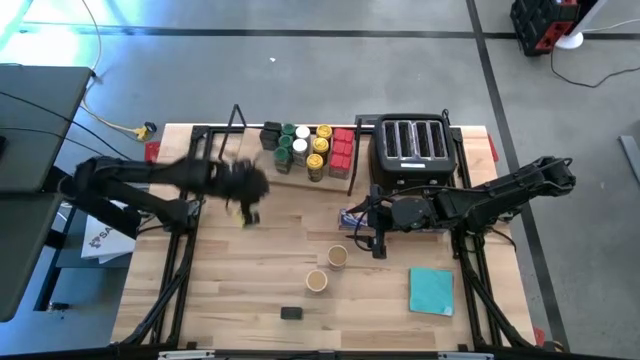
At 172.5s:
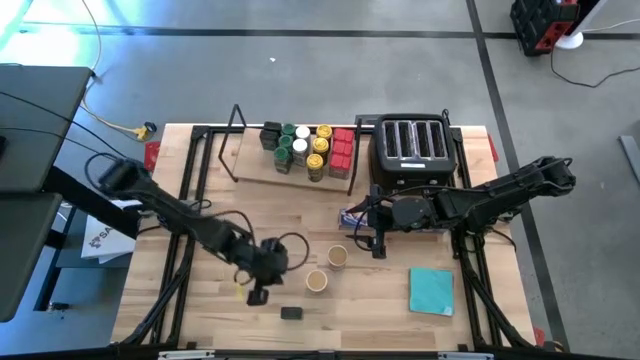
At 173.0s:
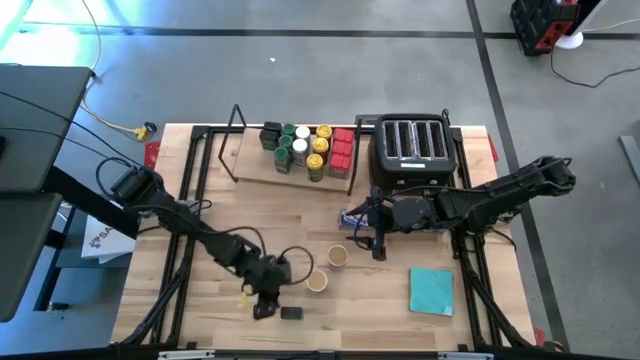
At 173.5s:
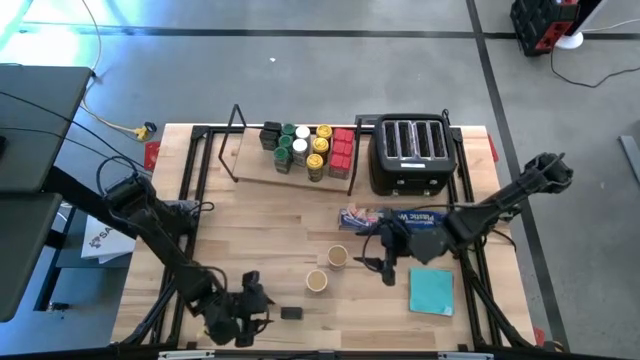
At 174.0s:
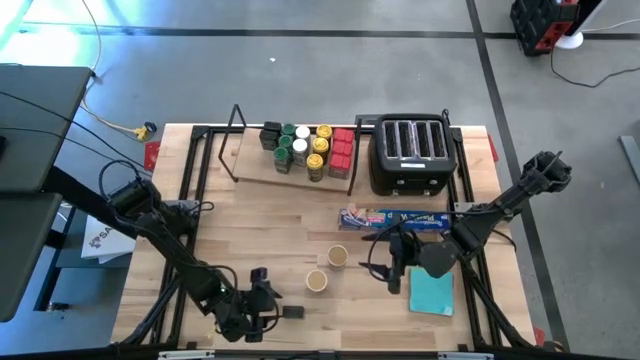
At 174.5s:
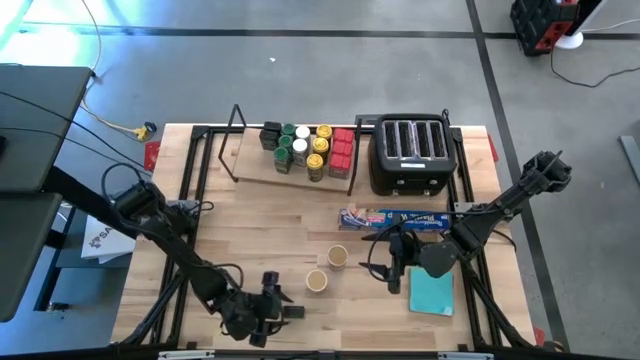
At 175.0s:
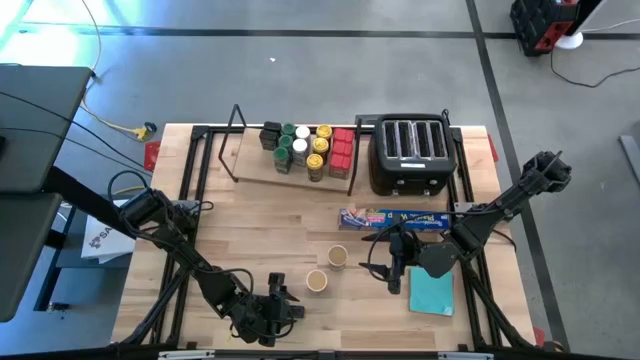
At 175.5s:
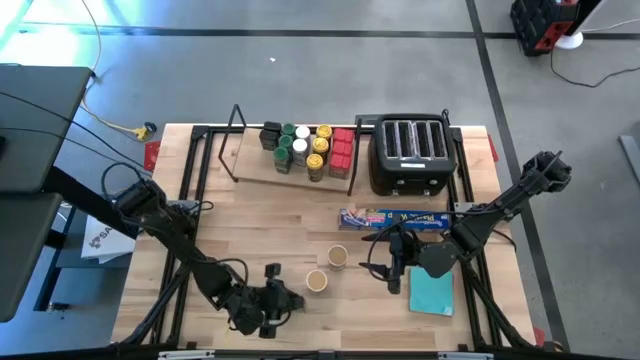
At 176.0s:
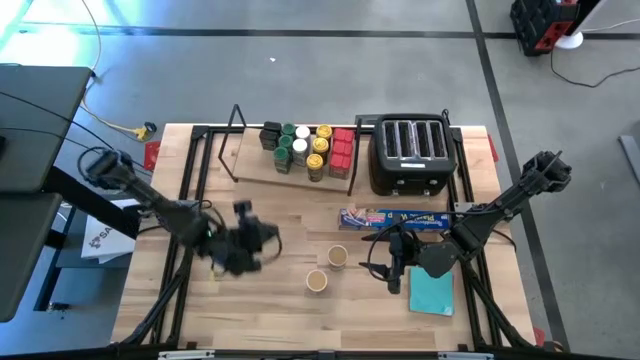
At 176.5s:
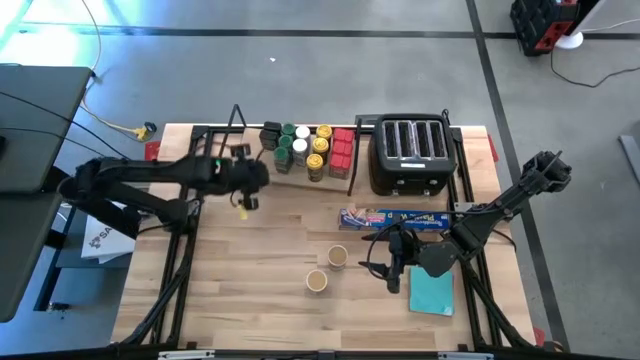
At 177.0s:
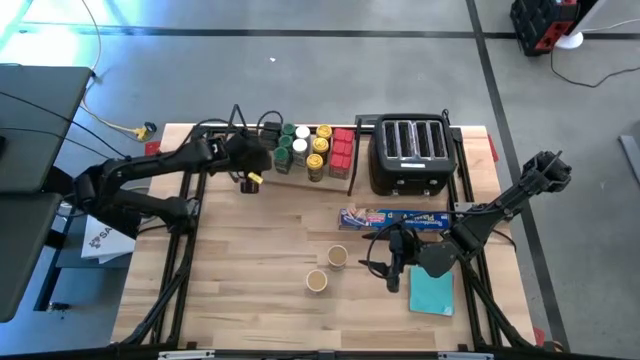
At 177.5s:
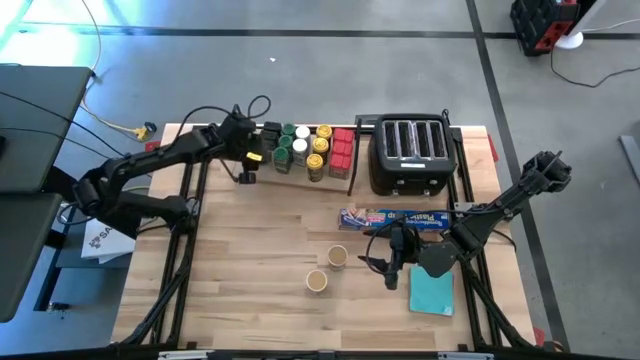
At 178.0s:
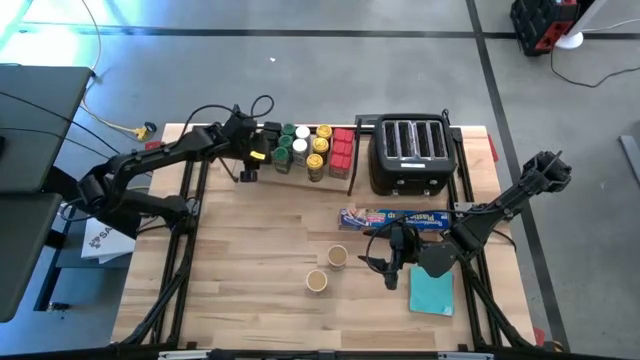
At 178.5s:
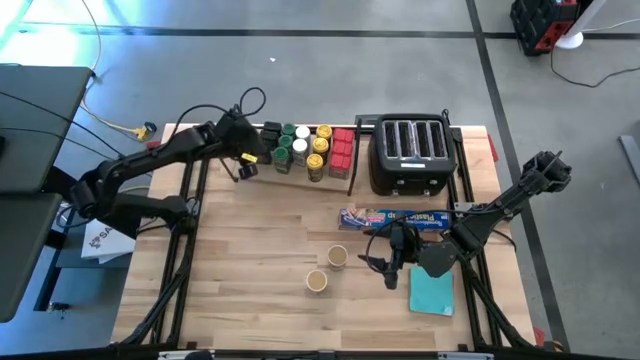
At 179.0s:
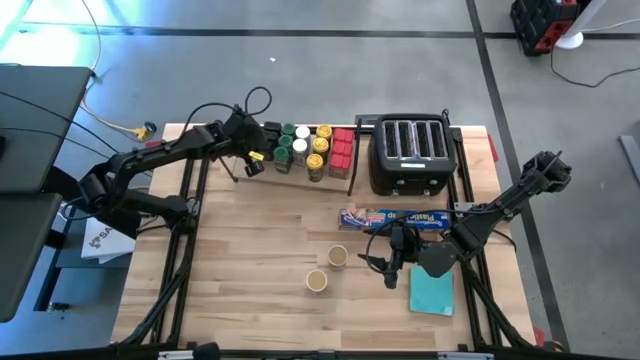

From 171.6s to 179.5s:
Task: Shelf spices
Put the black seasoning can on the shelf aligned with the other black seasoning cans

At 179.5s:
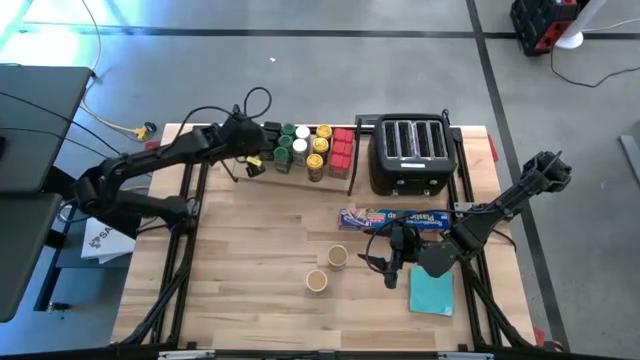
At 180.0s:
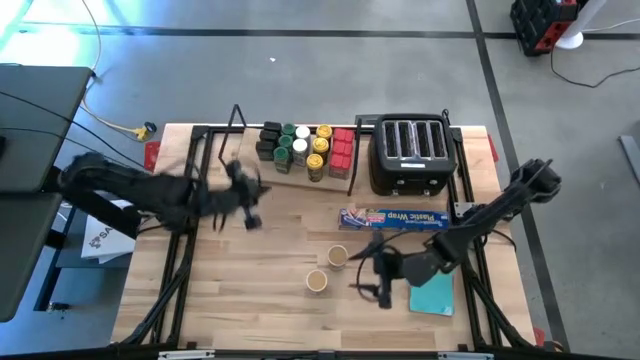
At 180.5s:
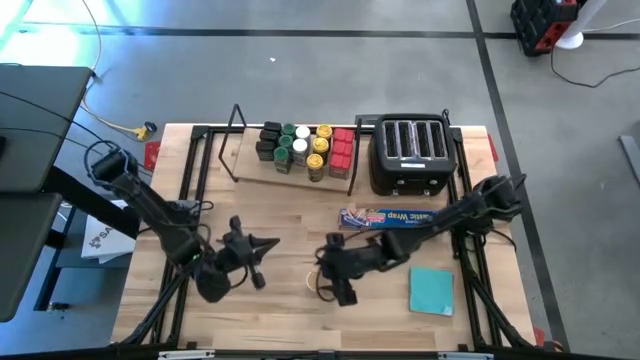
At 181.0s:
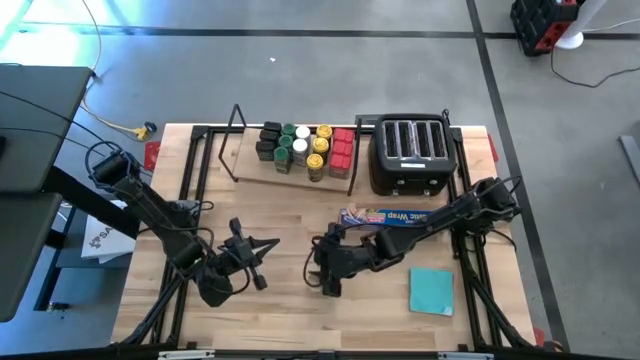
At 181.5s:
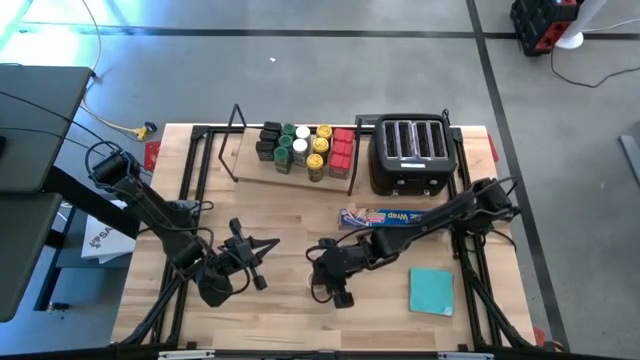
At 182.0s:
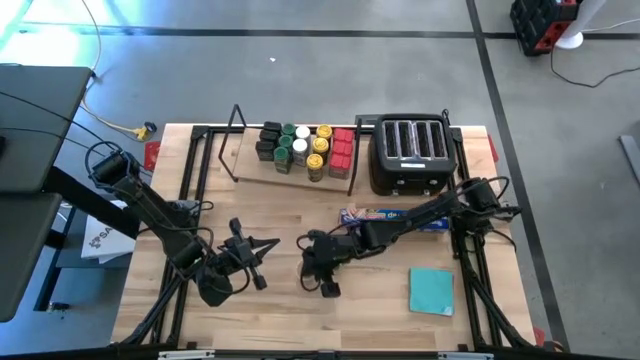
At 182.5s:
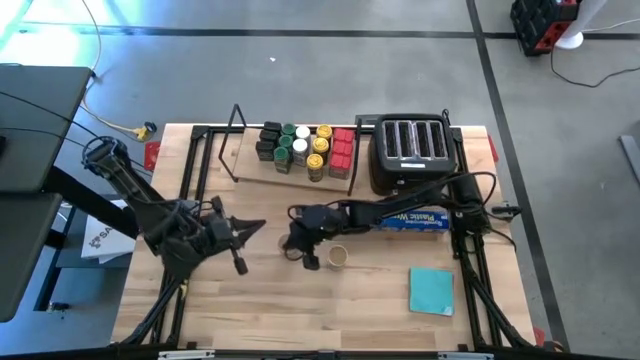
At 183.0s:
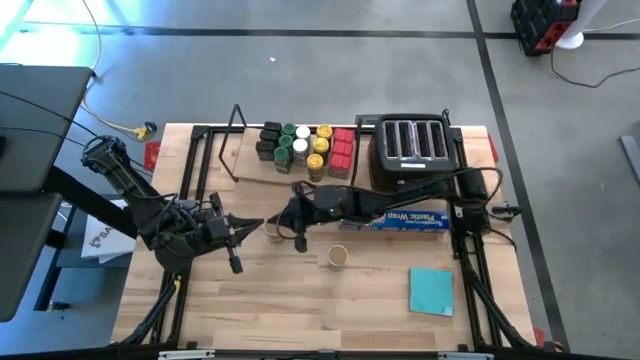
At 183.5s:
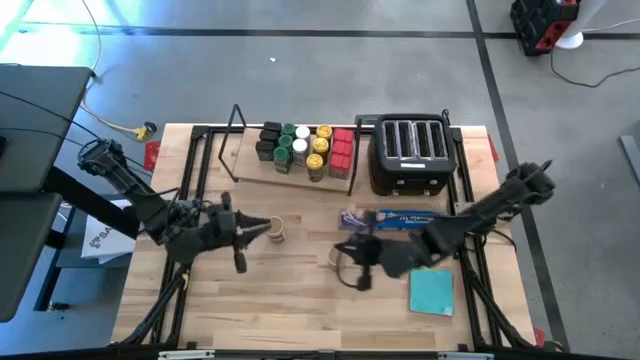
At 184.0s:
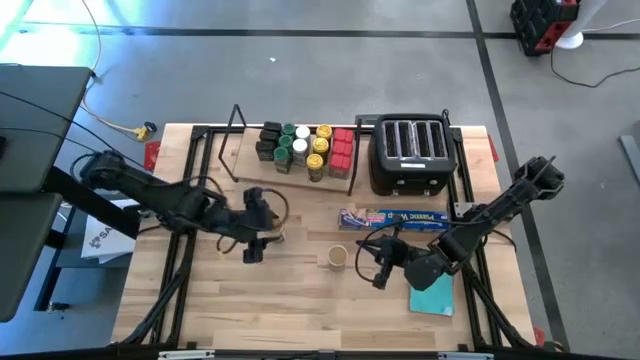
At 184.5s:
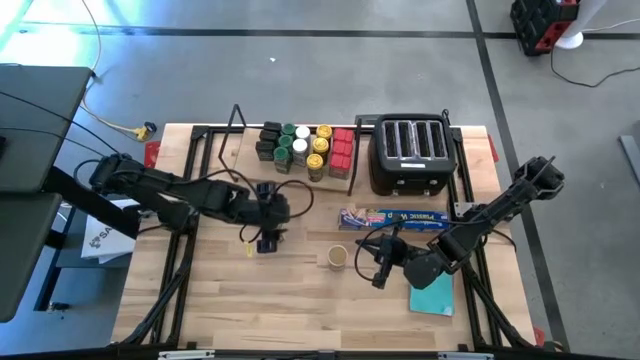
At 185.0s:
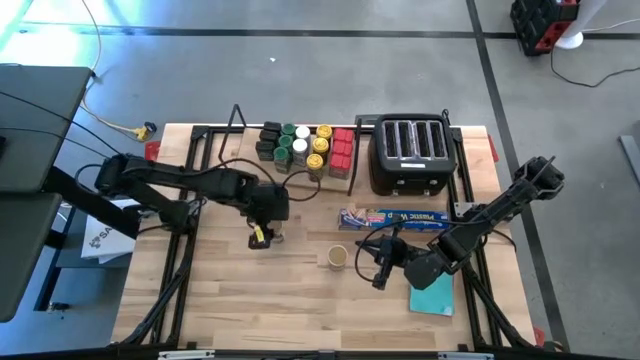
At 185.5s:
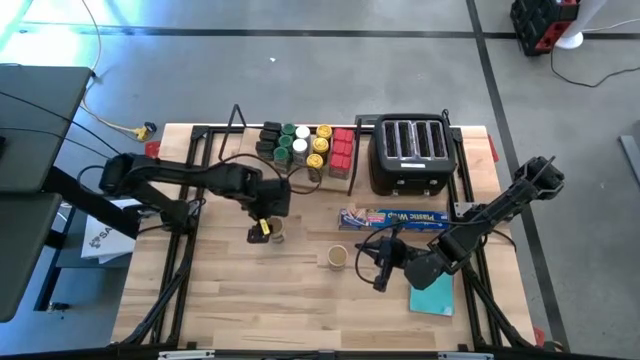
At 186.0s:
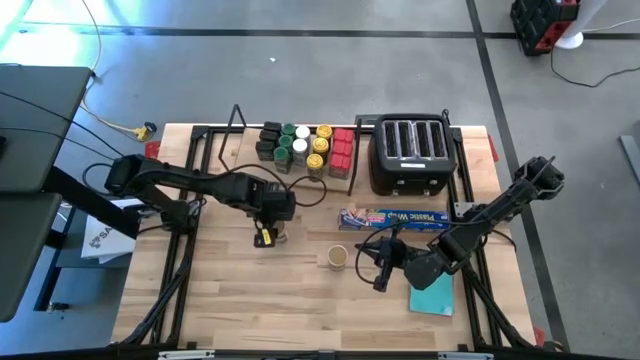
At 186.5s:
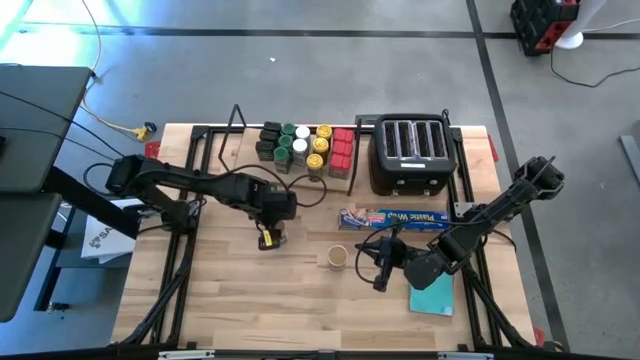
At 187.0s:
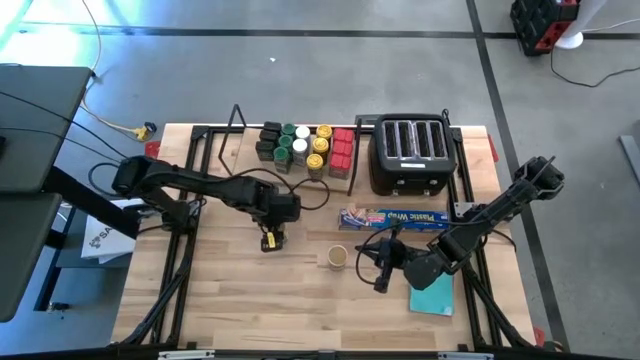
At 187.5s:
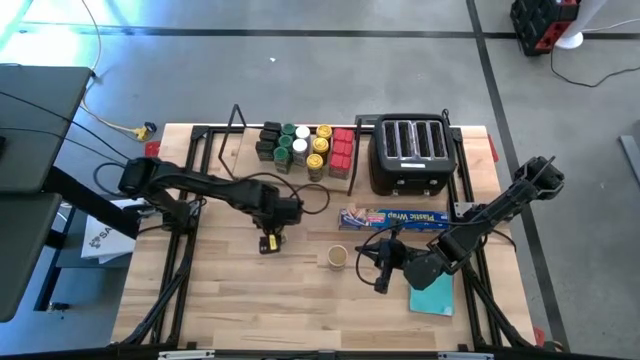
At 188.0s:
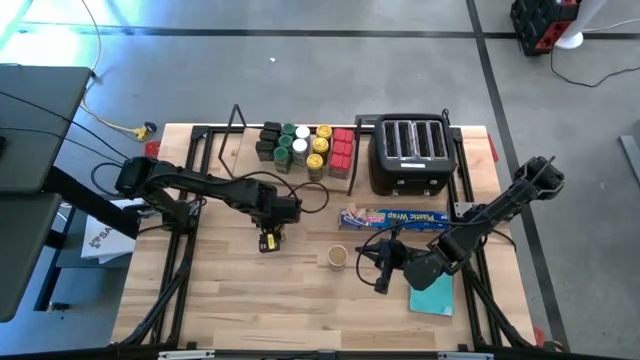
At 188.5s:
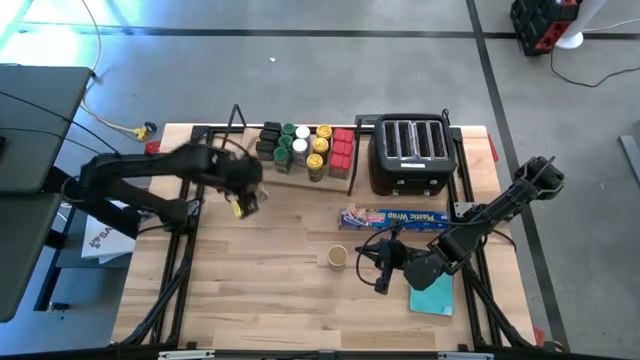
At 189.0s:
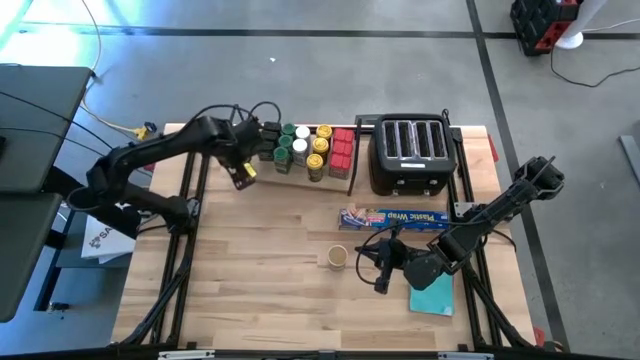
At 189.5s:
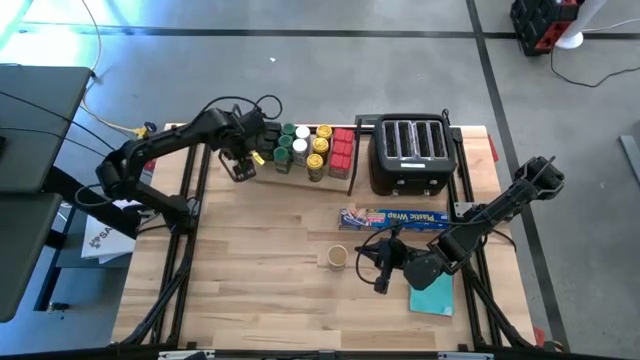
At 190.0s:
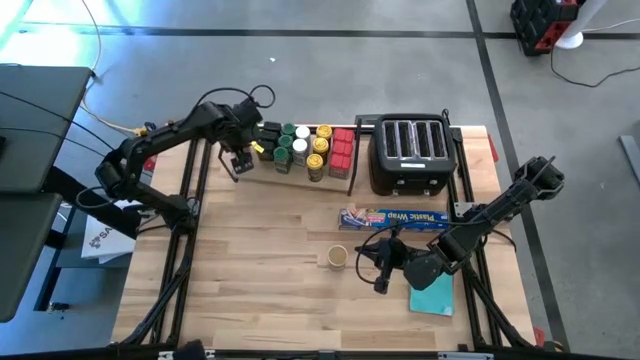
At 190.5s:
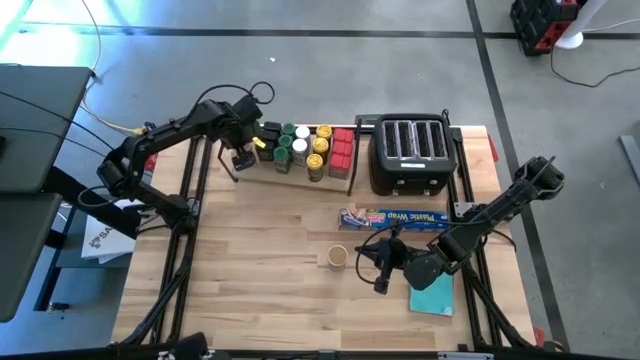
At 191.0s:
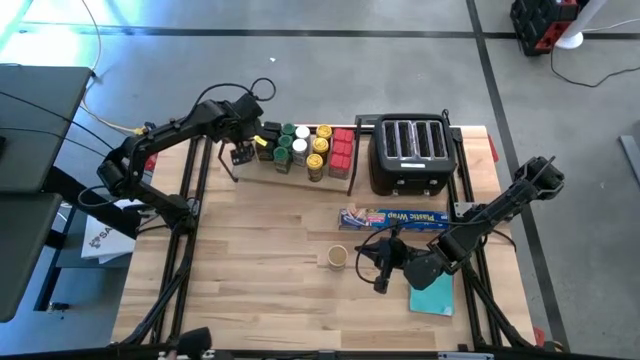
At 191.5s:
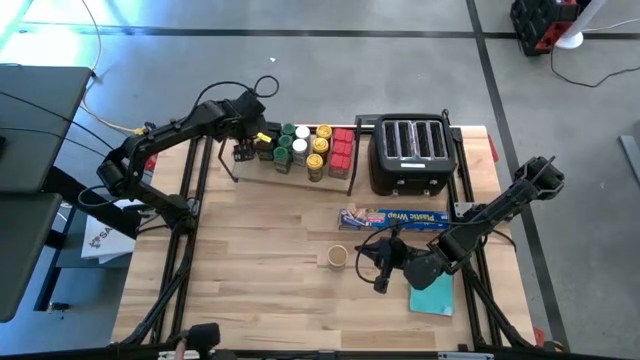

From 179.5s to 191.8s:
Put the bottom gold seasoning bottle on the shelf

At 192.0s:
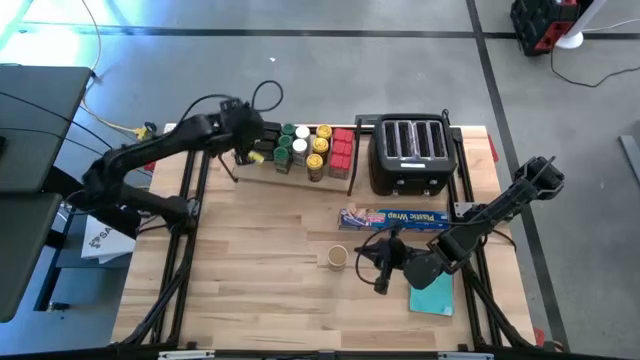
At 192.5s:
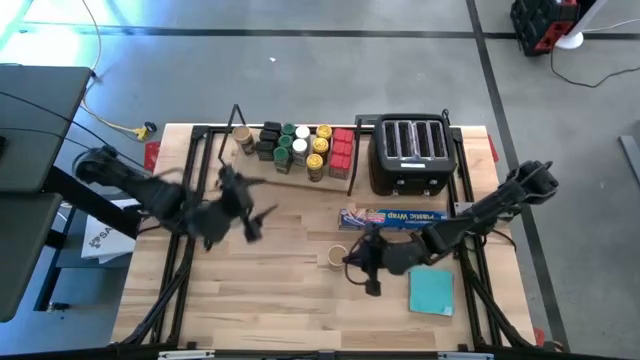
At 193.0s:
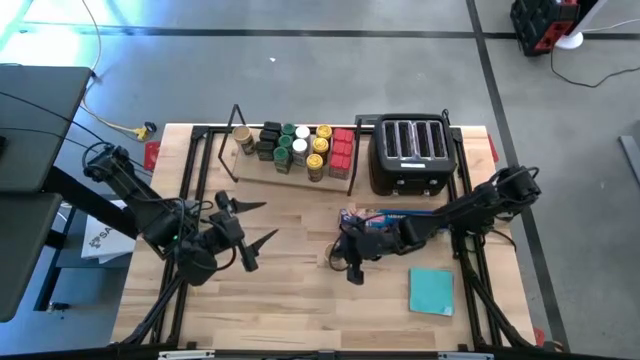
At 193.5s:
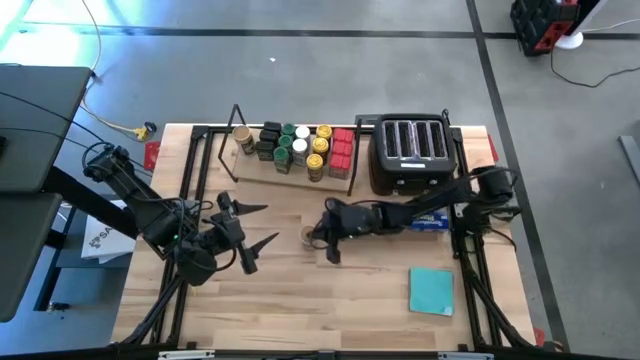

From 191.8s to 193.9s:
Move the gold seasoning bottle to the center of the table

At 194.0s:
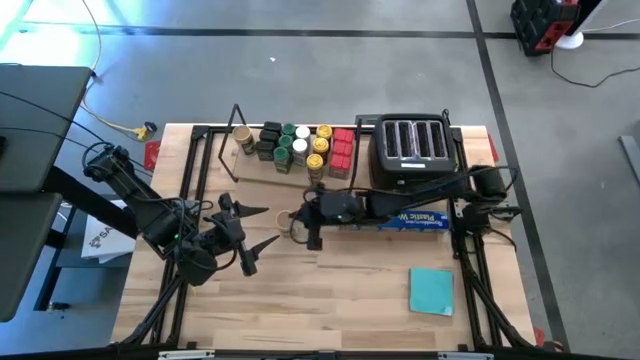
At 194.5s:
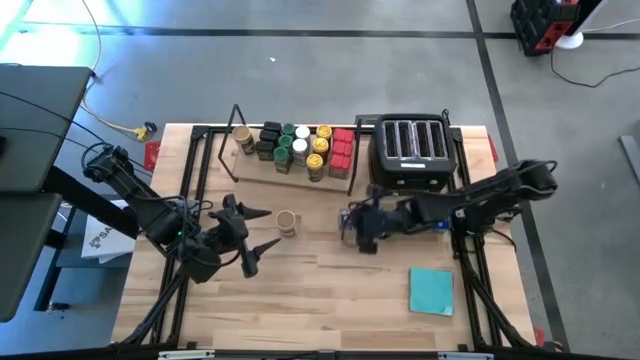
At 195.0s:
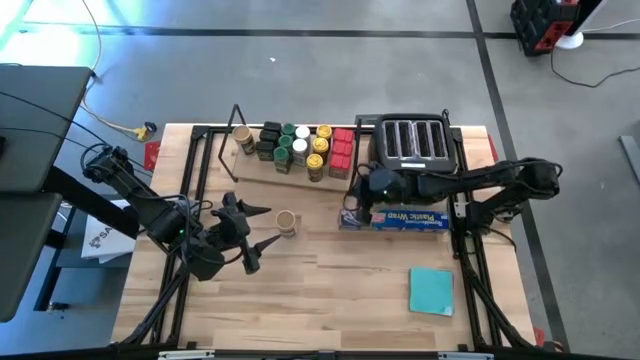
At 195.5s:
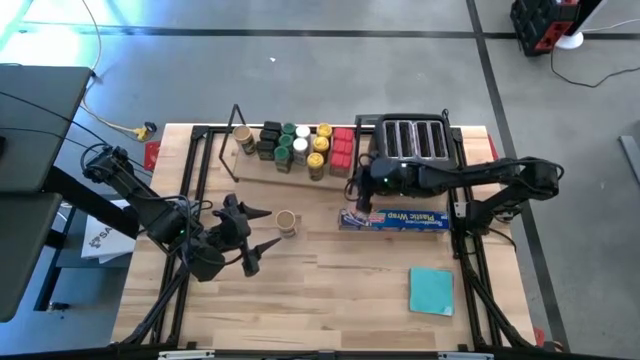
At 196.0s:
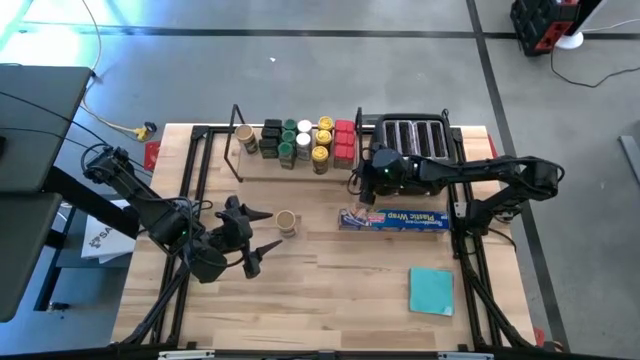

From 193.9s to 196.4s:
Adjust the shelf
